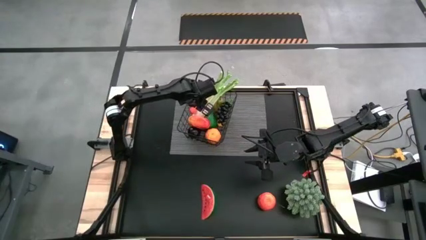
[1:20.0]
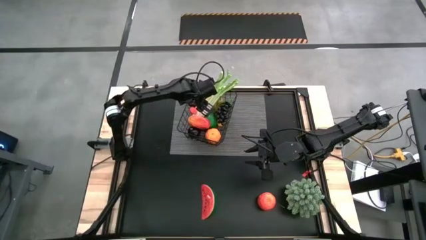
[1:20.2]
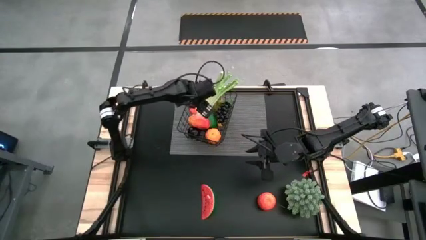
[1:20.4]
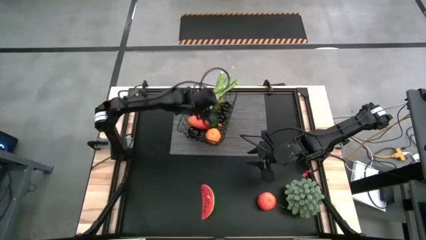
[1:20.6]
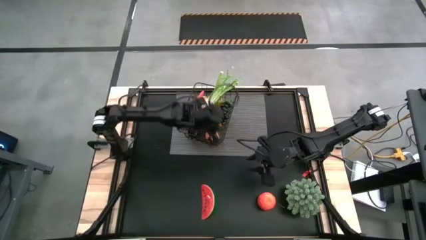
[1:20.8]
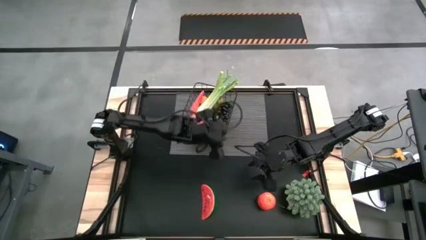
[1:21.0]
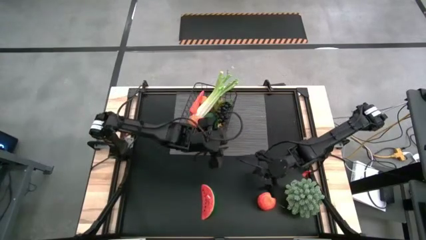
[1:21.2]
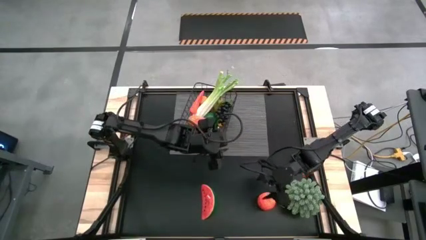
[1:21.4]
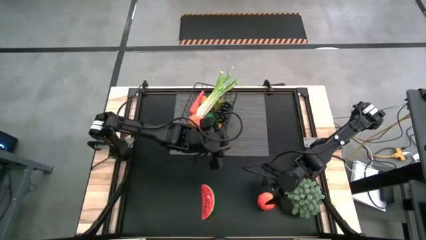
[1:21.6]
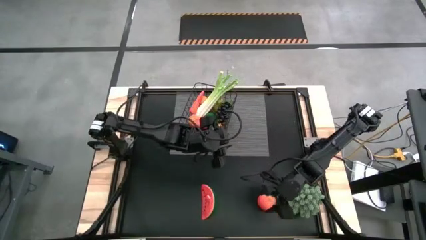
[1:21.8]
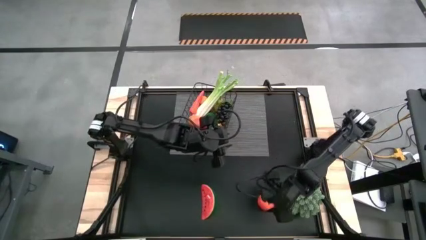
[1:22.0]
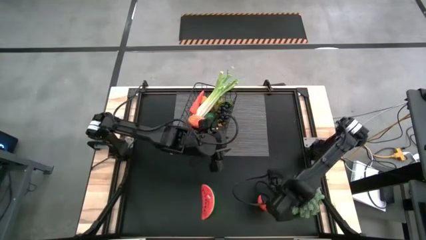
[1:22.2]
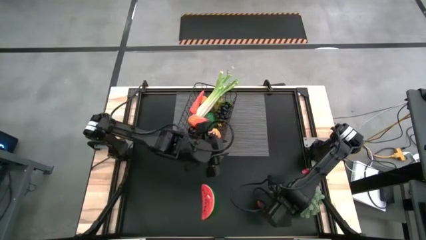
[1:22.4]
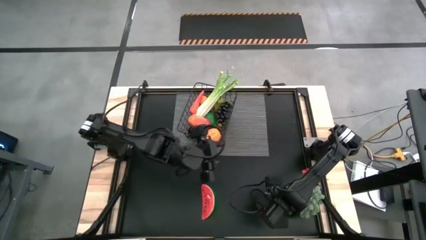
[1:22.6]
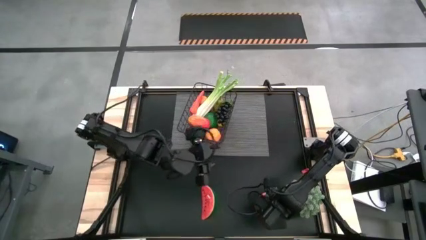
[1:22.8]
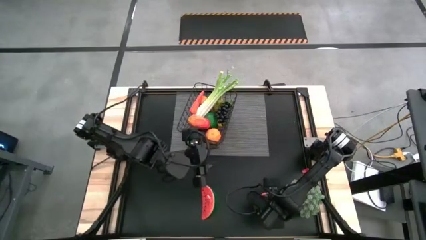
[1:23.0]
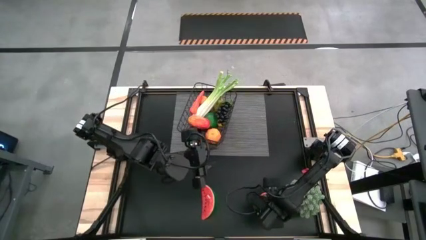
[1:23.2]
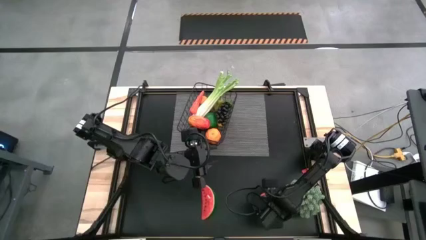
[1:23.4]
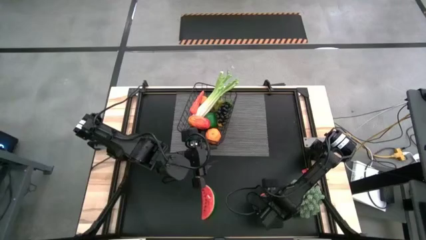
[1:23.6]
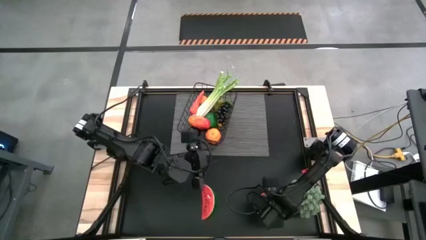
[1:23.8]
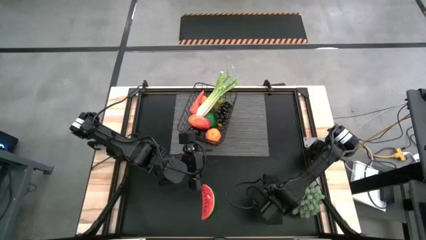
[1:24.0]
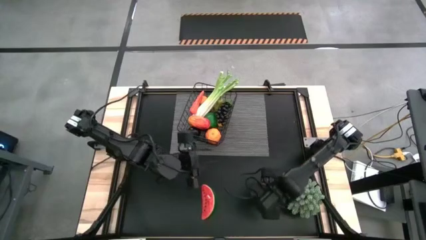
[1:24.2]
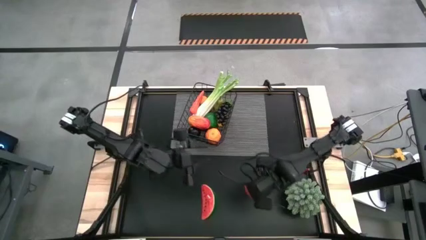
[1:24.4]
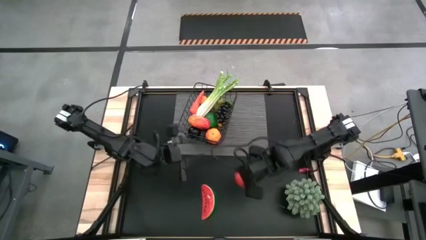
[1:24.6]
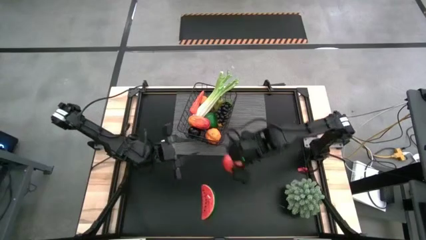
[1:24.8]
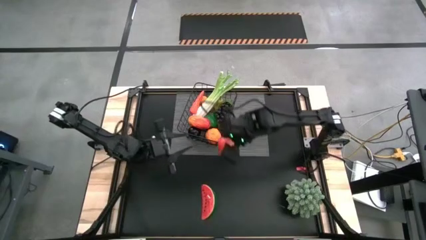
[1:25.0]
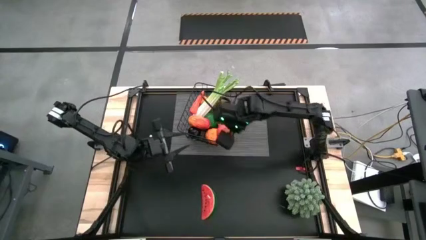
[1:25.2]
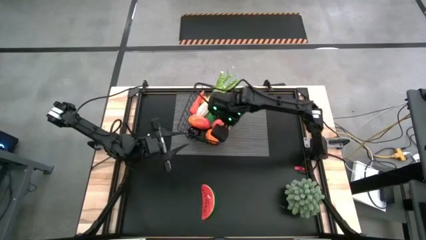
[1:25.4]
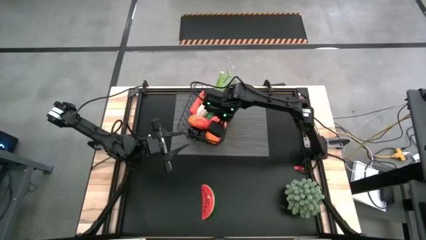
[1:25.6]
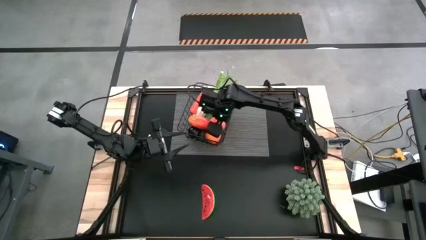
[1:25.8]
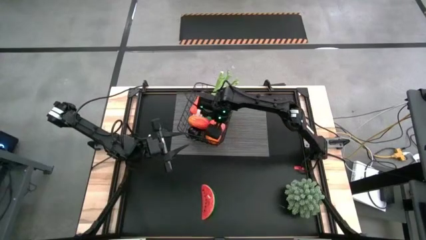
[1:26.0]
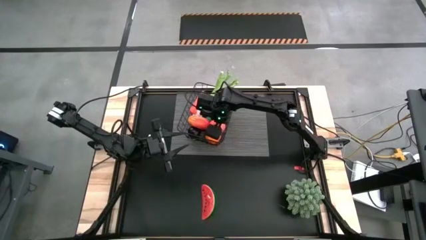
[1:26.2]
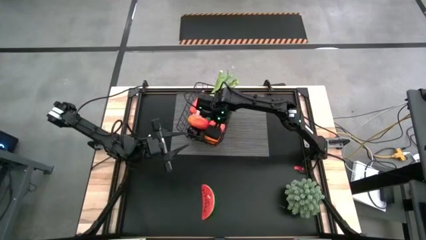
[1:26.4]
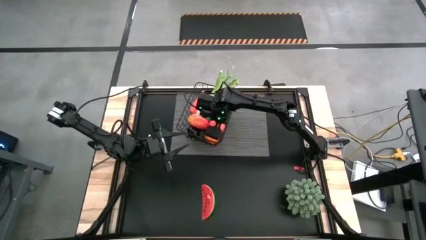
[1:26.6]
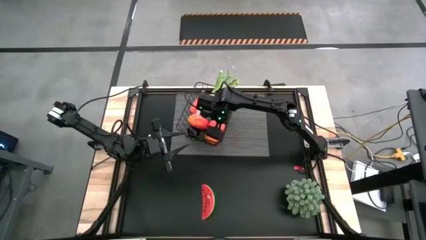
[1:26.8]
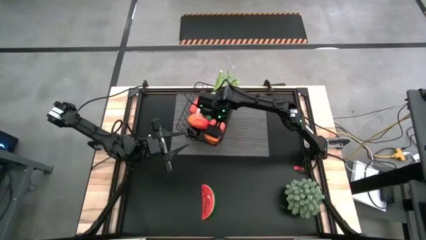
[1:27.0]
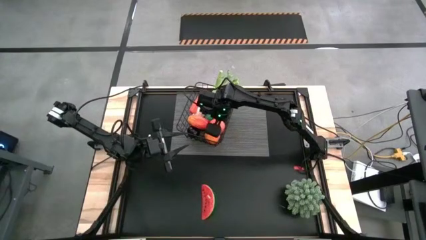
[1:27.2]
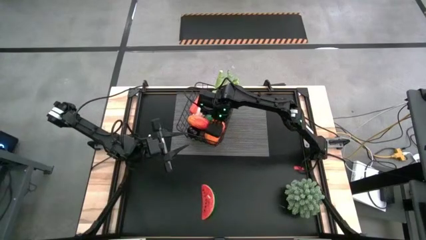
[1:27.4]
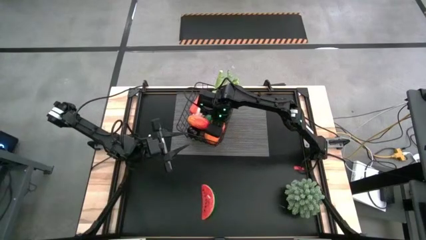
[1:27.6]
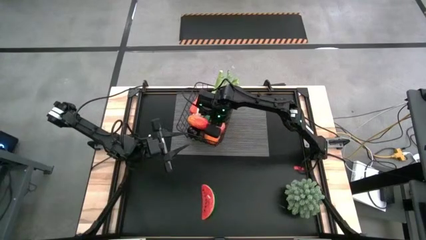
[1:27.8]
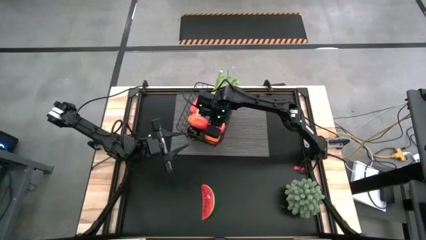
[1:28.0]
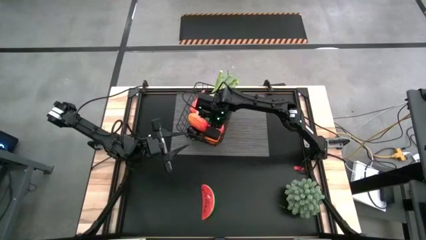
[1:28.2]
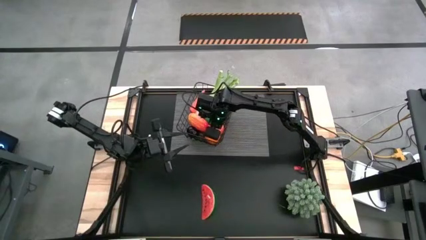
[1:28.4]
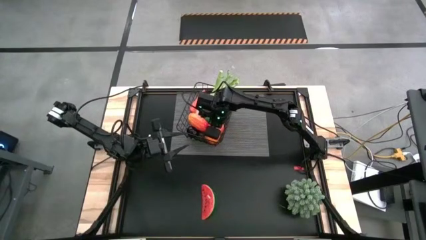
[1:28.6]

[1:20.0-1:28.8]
Task: Build produce basket
Put the apple into the wire basket

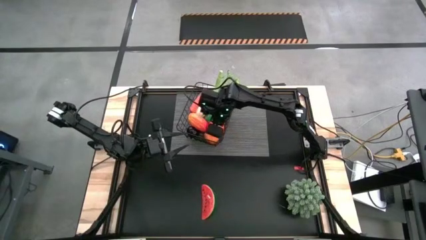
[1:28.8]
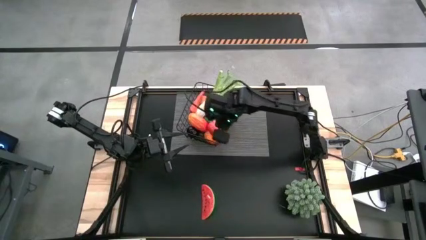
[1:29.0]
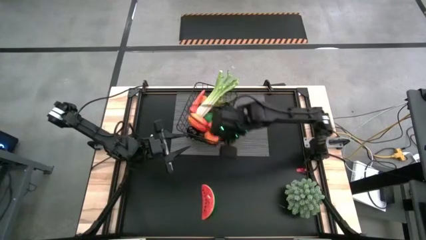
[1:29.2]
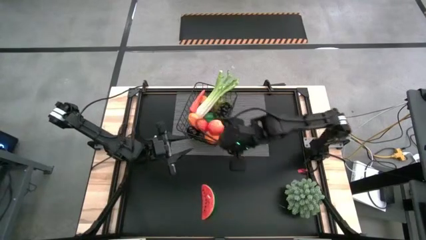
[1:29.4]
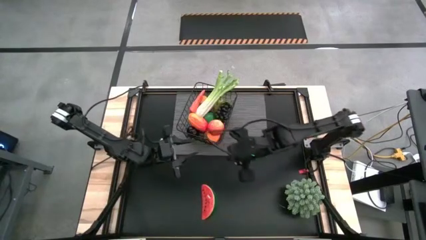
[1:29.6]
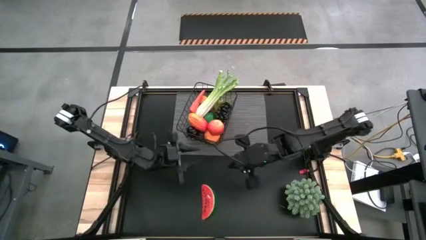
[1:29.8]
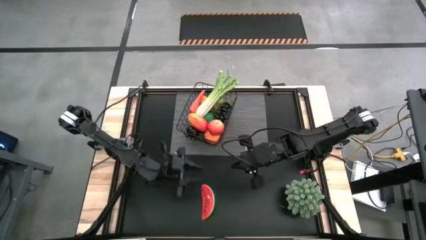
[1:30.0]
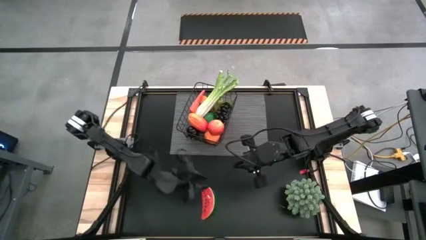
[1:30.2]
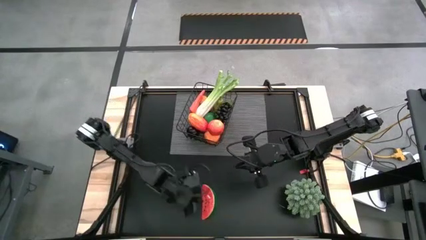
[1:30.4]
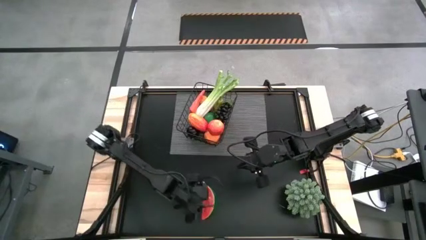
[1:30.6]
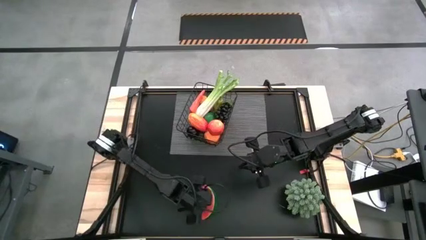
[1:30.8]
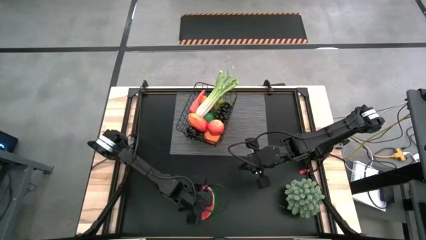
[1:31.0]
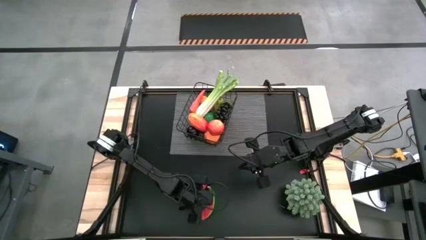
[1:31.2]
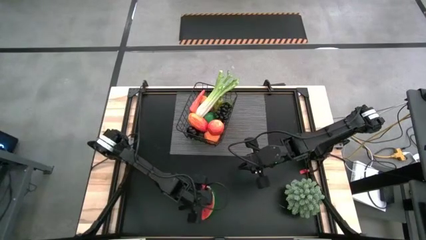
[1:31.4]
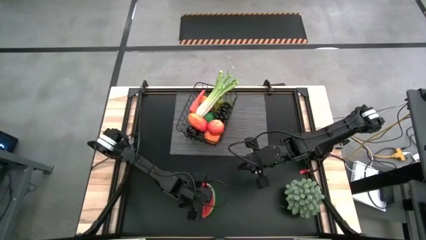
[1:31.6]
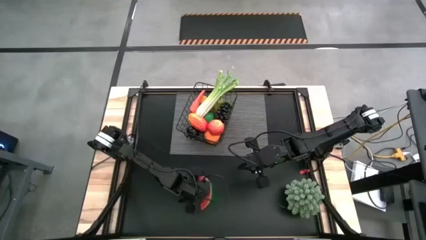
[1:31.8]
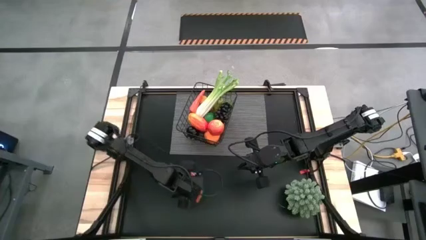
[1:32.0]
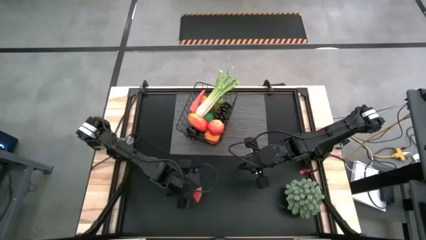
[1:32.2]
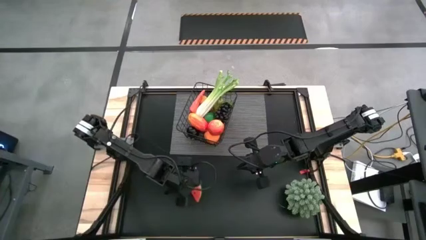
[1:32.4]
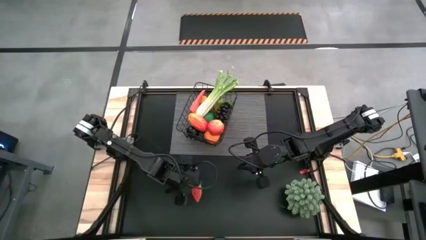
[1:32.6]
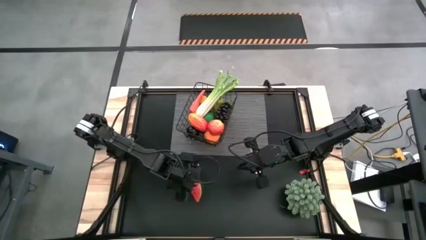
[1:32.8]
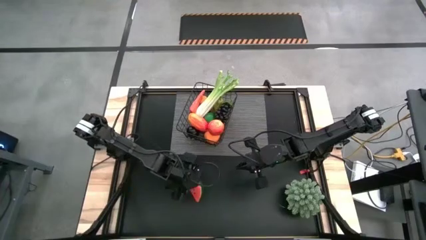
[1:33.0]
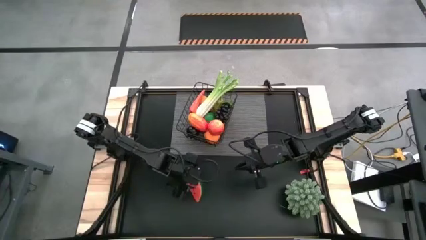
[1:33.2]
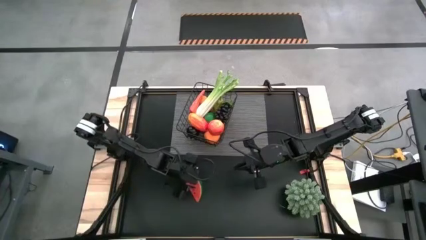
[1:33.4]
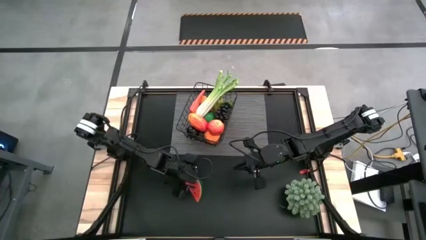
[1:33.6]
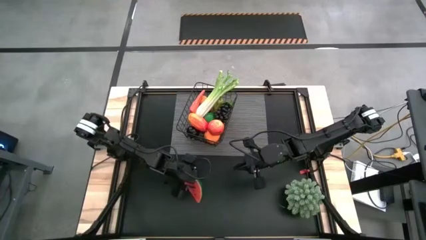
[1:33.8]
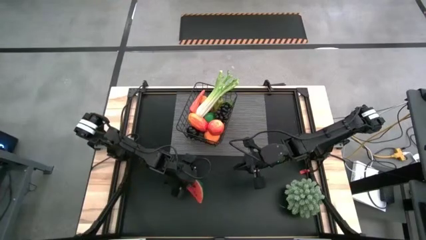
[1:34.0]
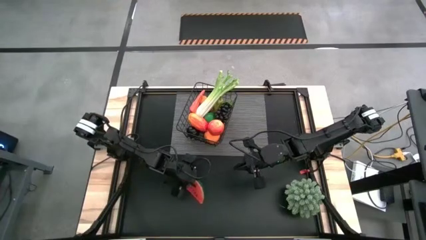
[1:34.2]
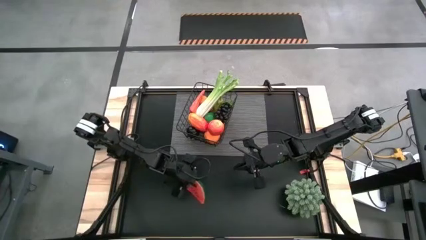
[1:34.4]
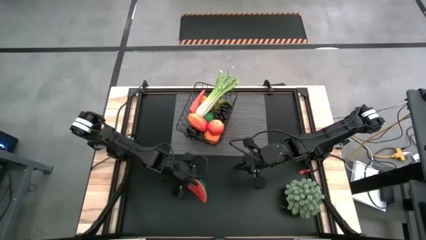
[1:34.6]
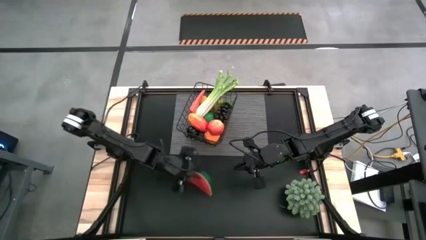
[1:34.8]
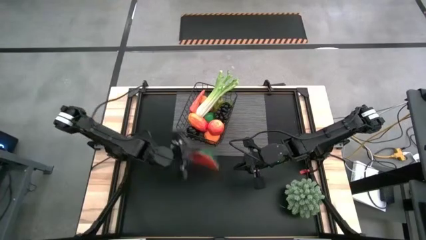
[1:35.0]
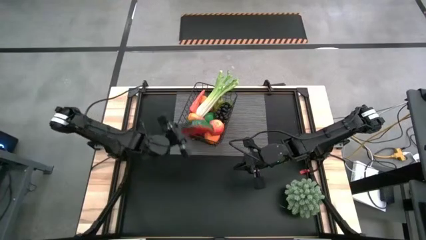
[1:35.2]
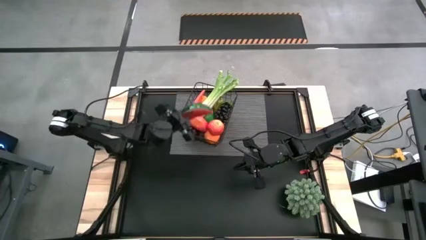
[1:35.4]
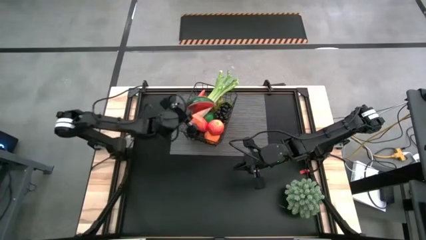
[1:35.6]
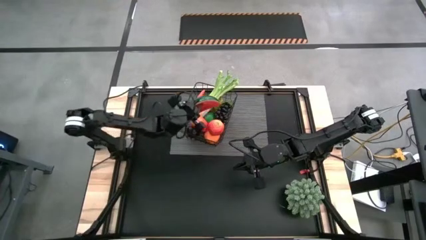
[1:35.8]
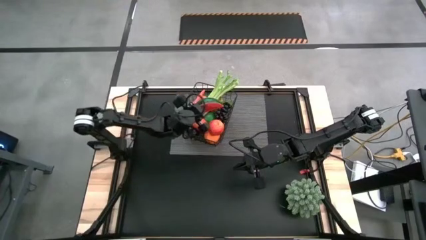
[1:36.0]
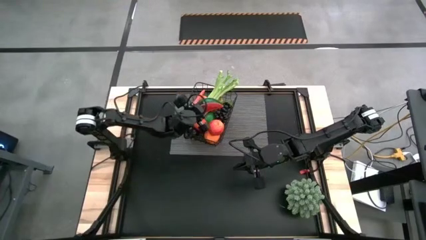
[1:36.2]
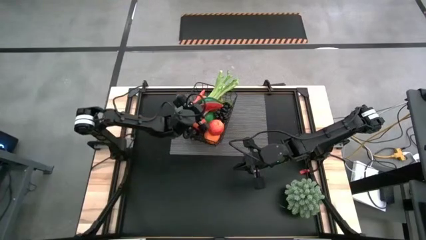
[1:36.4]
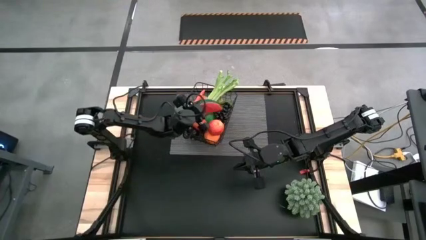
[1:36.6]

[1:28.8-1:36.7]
Put the watermelon into the wire basket
